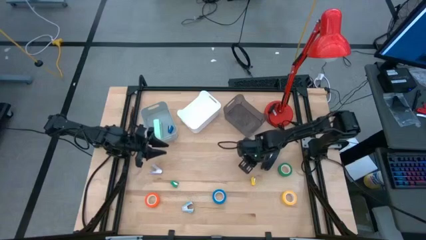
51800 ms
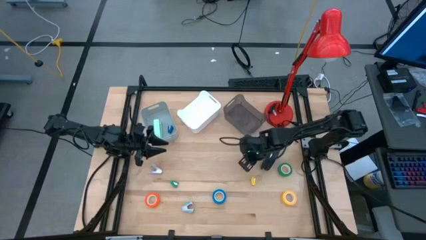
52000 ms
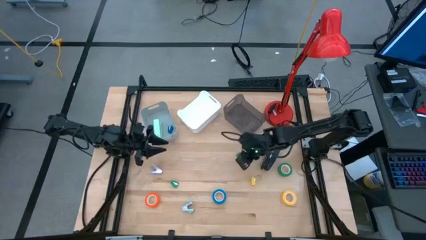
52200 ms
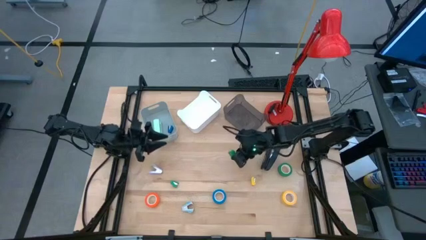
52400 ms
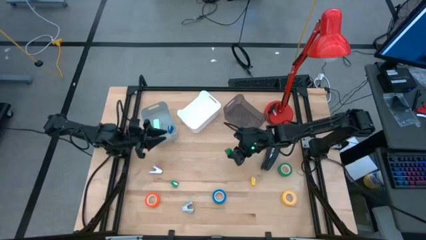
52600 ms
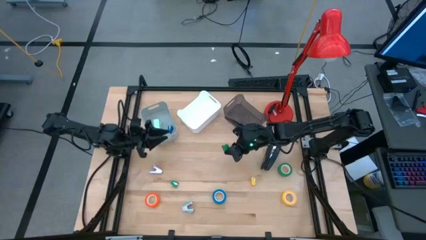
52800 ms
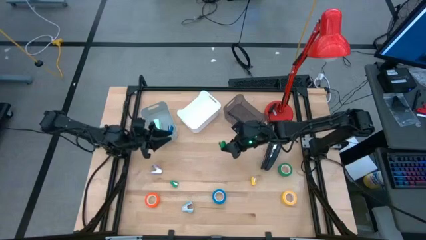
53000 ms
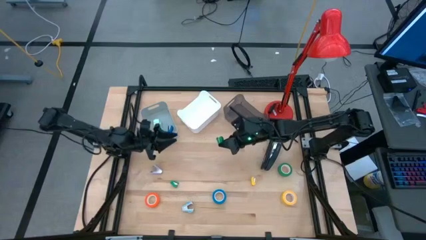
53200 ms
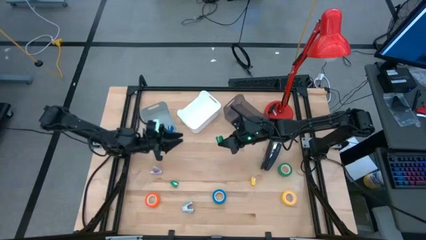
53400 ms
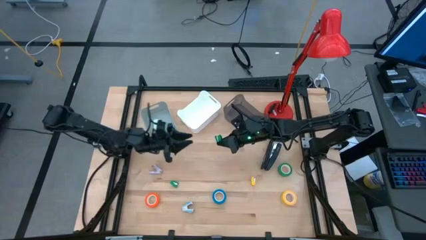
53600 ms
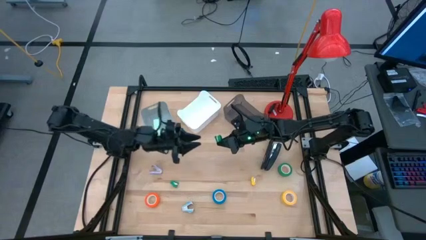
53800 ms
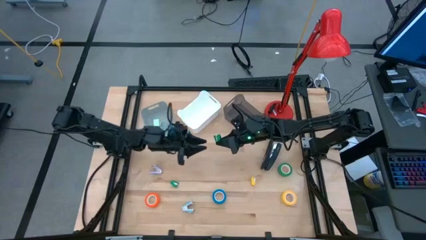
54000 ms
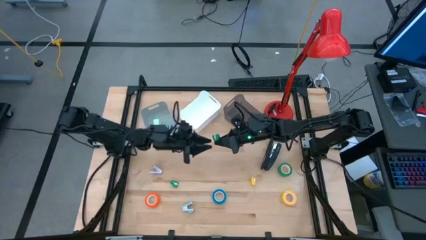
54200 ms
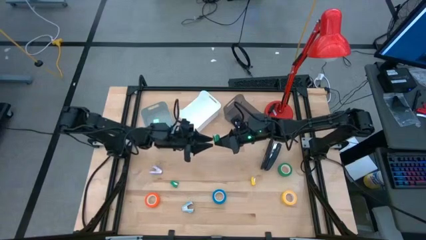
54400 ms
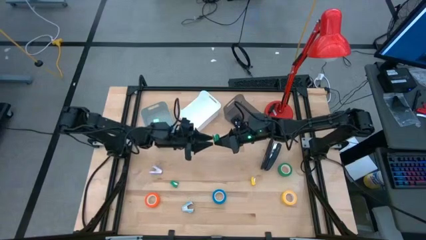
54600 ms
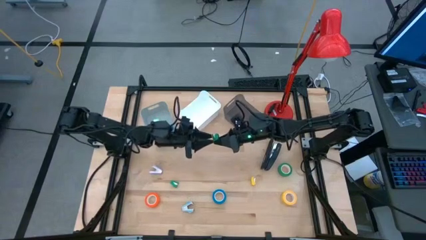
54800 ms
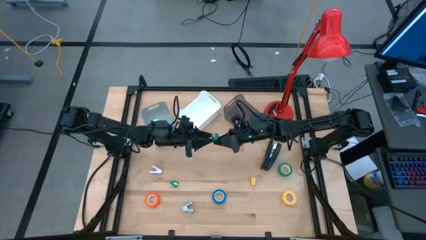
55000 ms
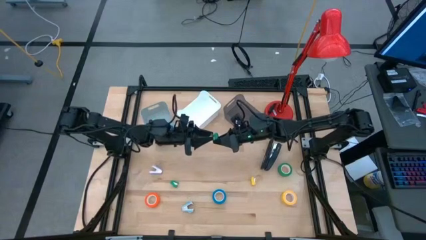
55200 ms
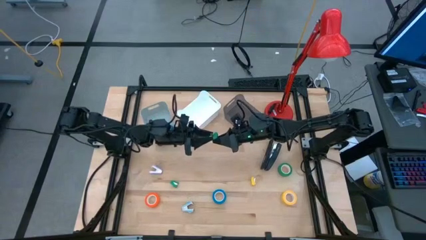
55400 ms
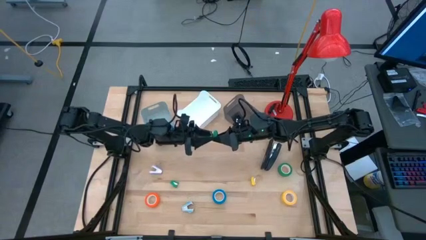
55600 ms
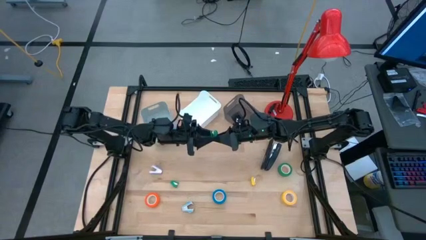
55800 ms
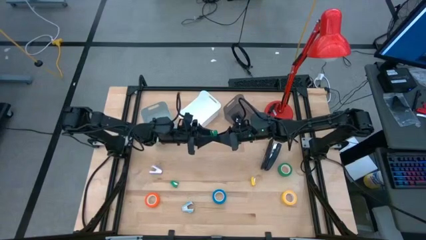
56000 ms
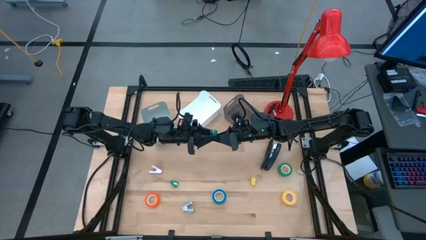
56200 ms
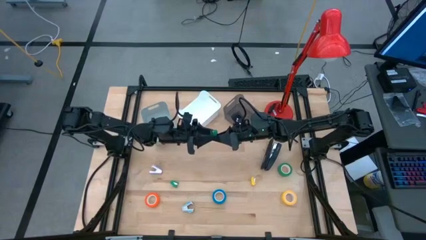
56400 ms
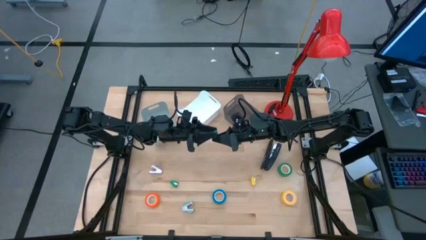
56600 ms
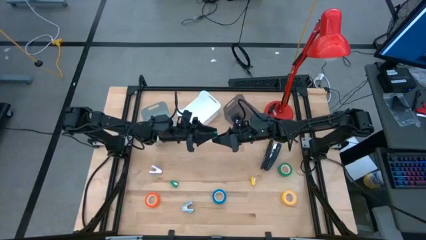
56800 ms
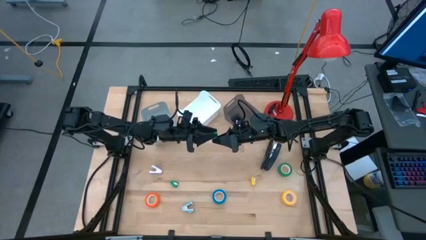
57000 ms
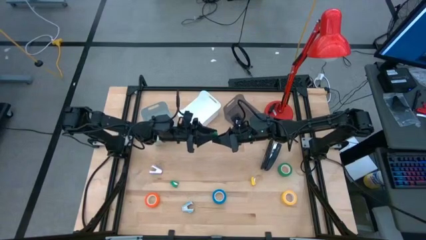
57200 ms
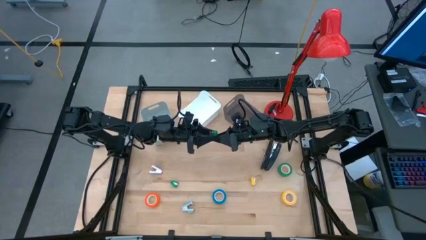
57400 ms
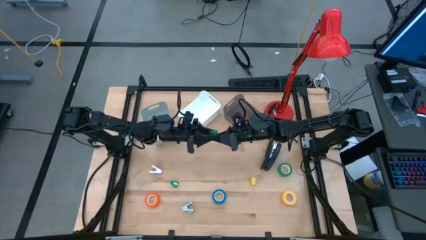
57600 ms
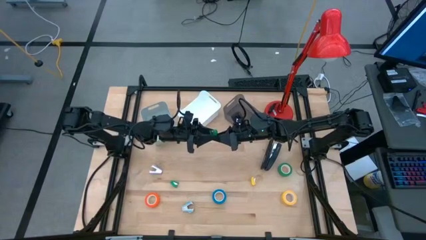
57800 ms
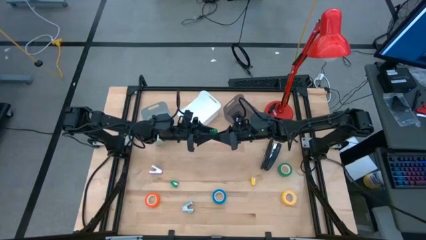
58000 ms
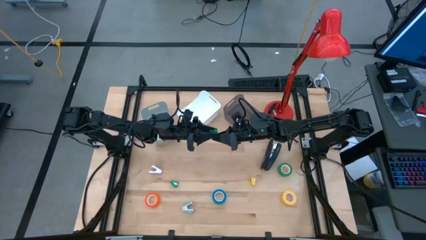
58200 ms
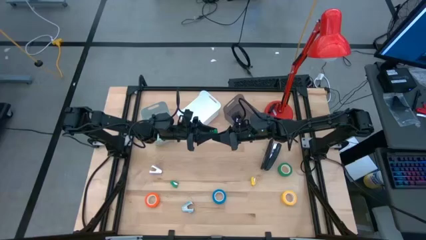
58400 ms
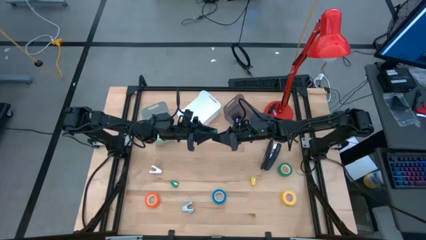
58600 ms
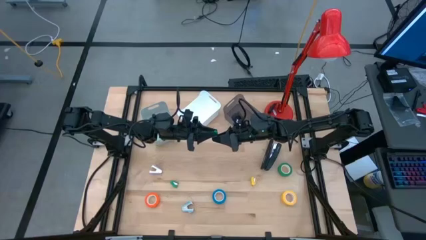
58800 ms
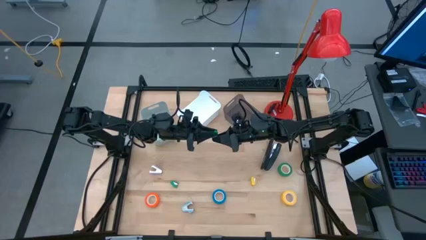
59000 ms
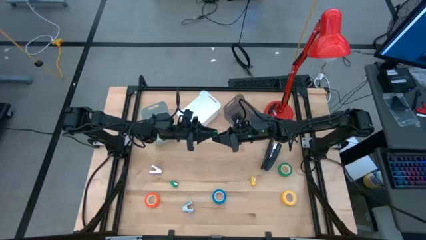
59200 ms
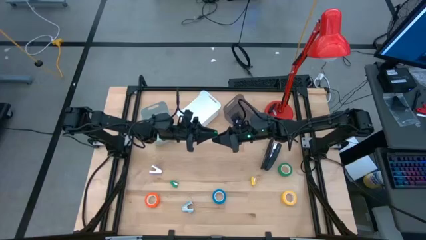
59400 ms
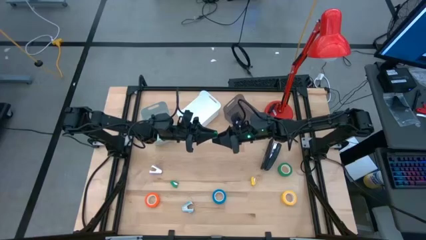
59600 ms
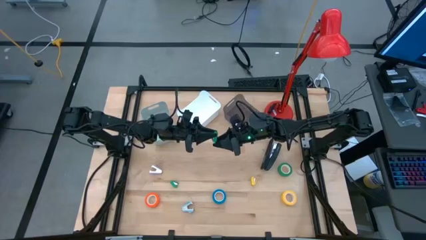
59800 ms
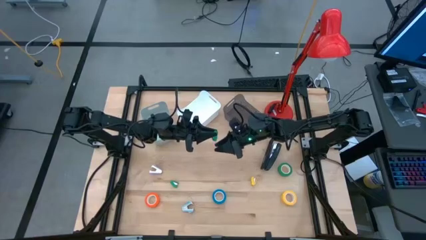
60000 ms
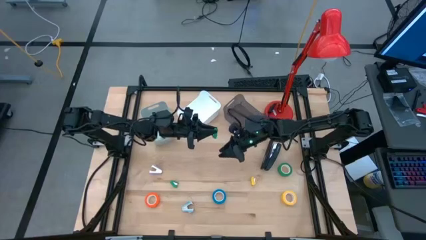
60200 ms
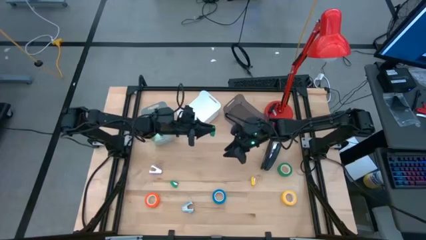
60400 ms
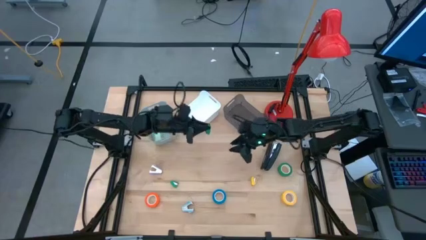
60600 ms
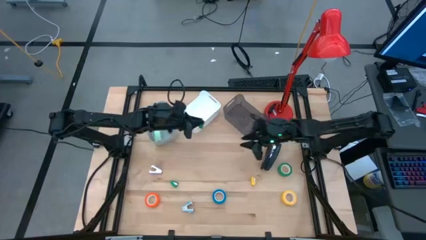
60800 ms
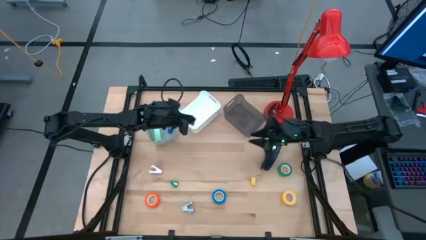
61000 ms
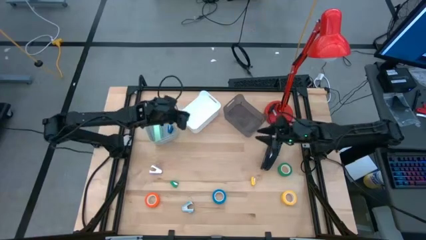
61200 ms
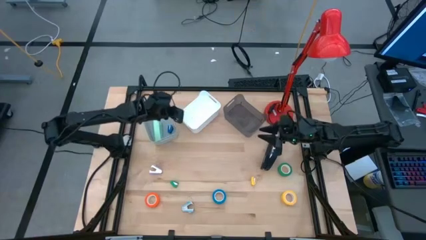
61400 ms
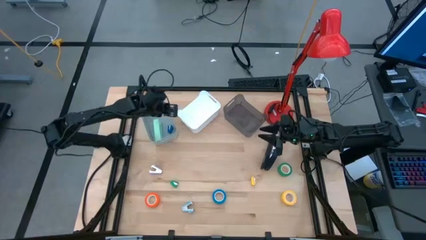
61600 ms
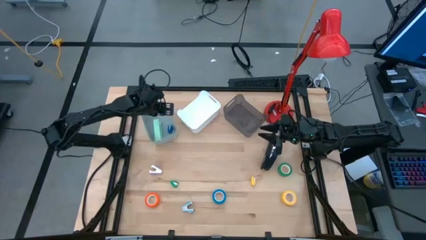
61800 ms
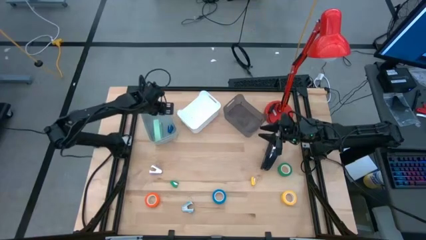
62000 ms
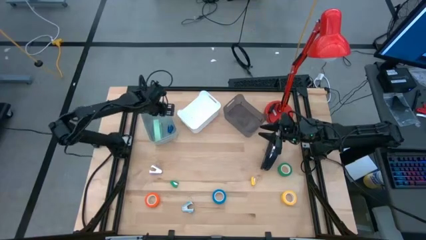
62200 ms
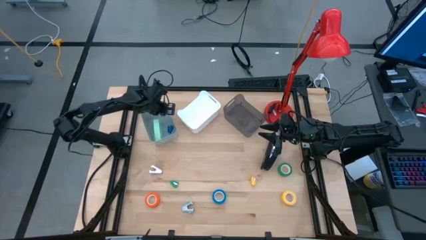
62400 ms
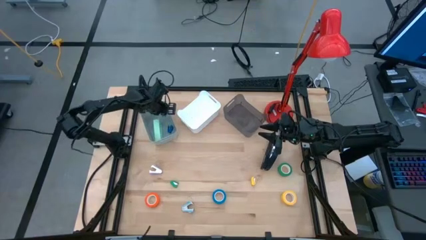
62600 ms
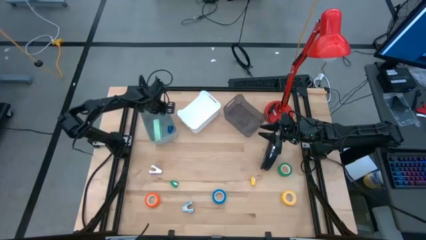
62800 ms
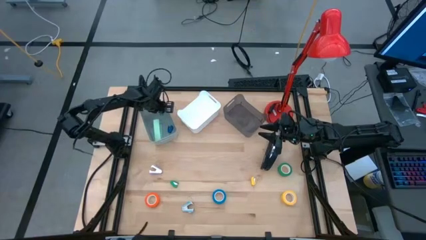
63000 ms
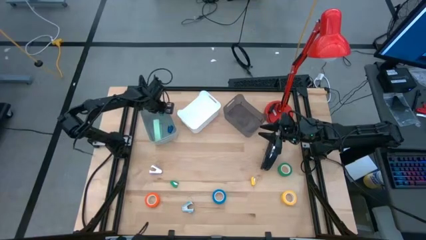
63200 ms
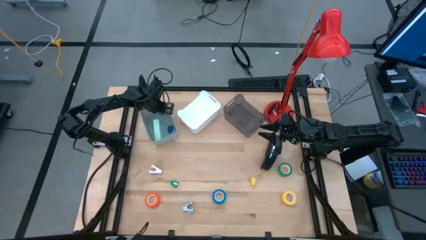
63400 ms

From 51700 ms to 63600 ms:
Task: Pick and place Stapler, Stapler remover, tape
Put the top green small stapler into the gray bin
